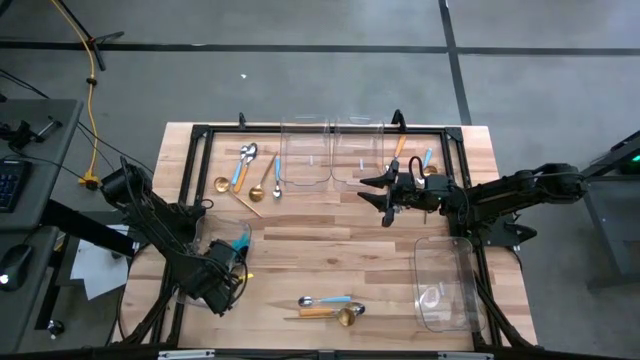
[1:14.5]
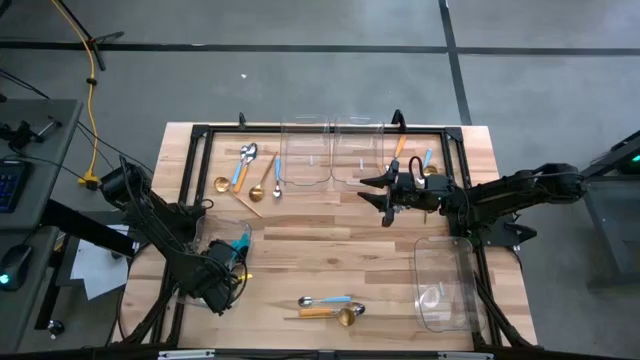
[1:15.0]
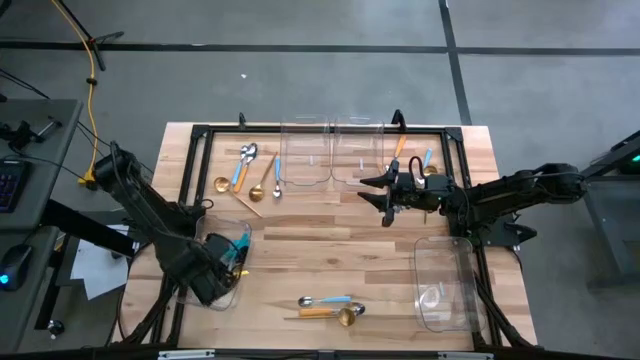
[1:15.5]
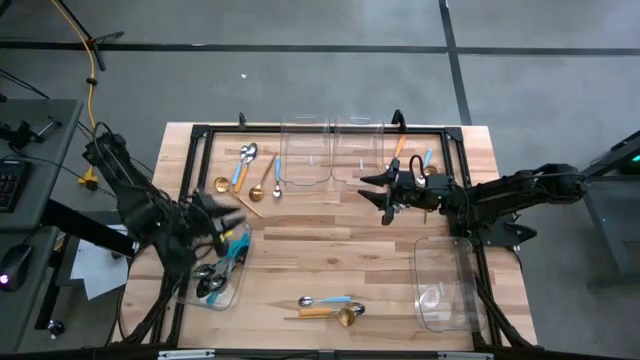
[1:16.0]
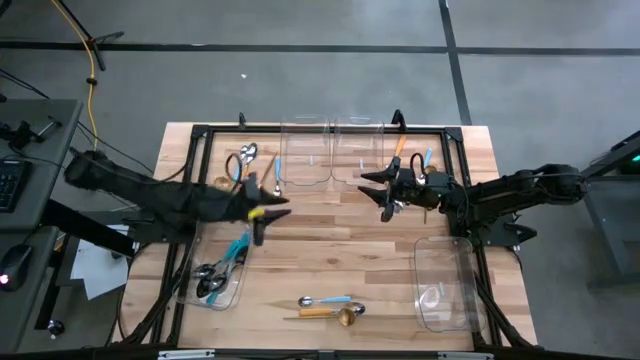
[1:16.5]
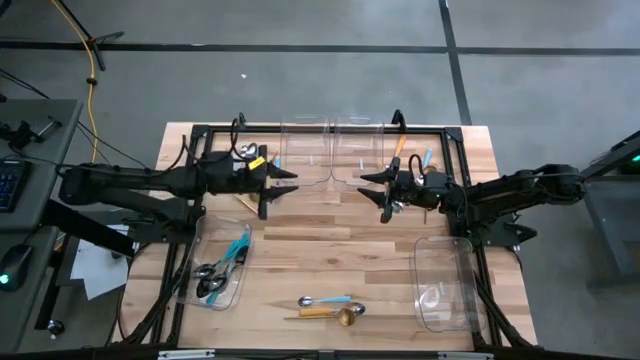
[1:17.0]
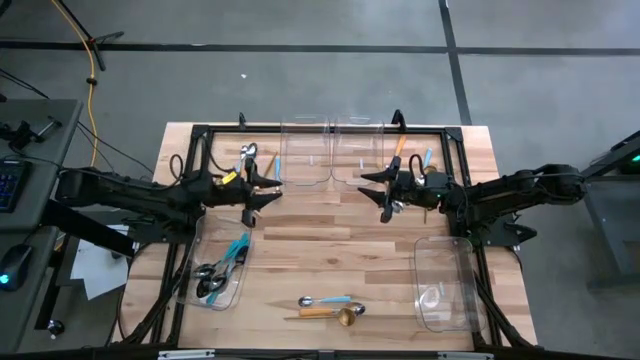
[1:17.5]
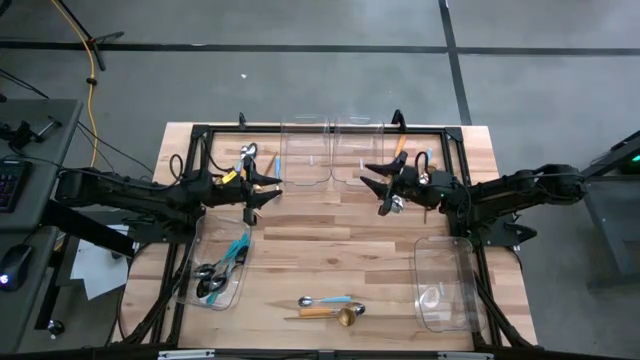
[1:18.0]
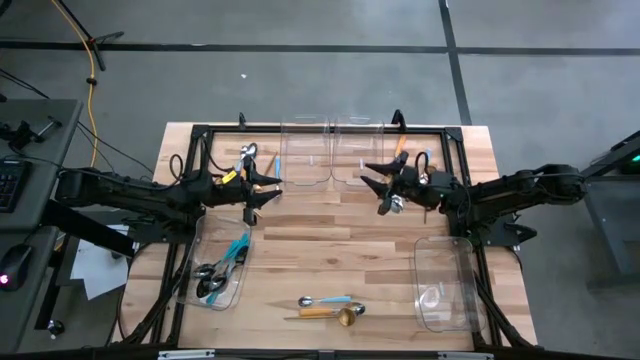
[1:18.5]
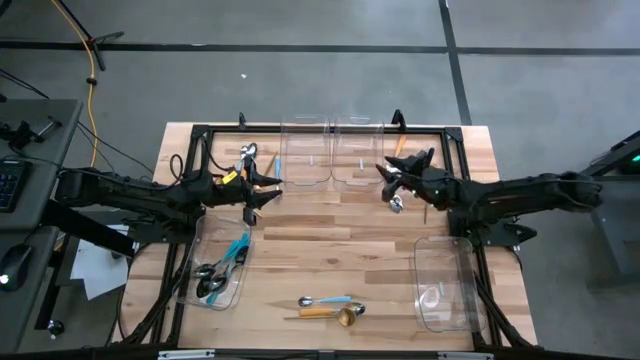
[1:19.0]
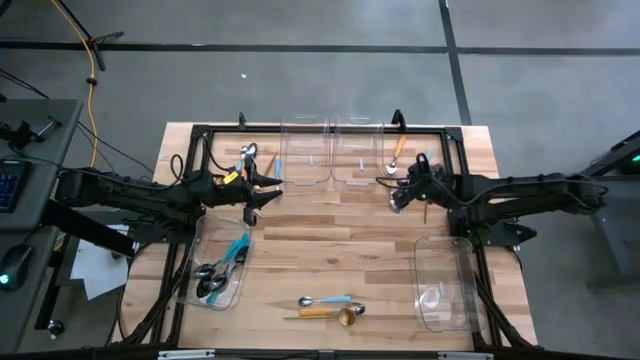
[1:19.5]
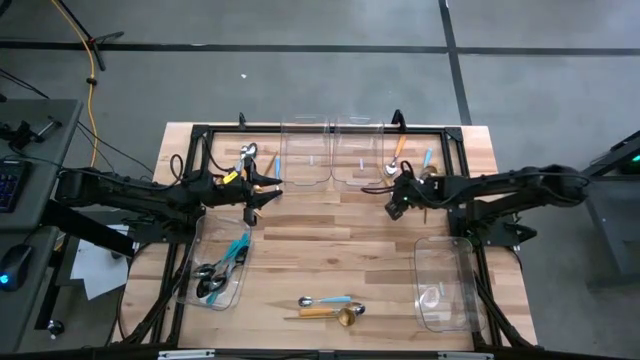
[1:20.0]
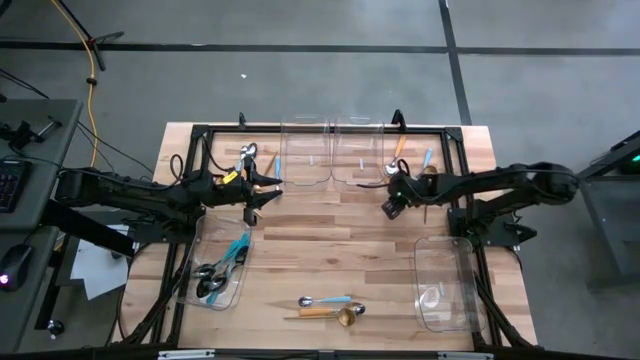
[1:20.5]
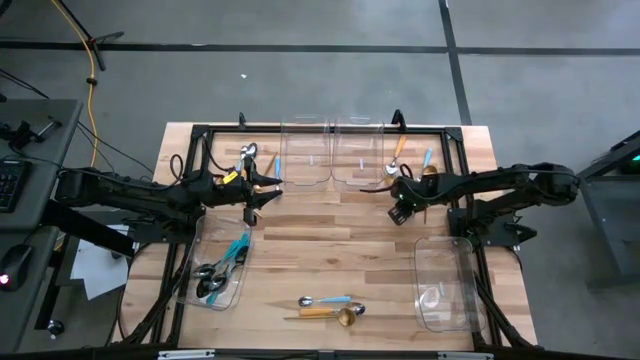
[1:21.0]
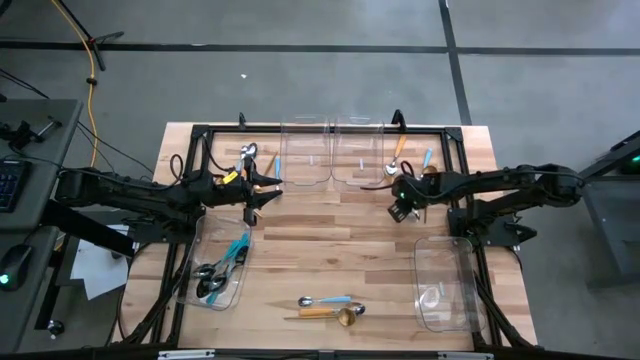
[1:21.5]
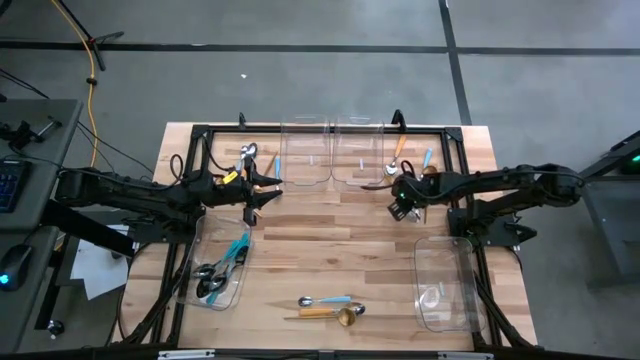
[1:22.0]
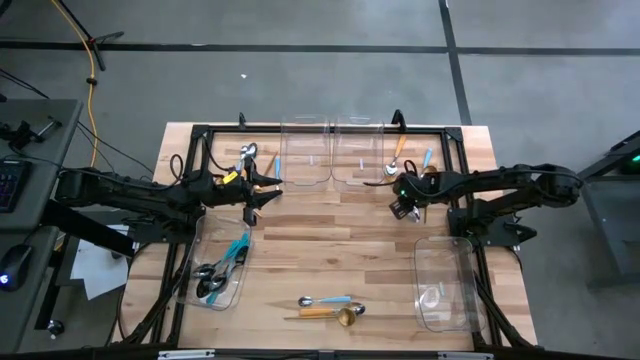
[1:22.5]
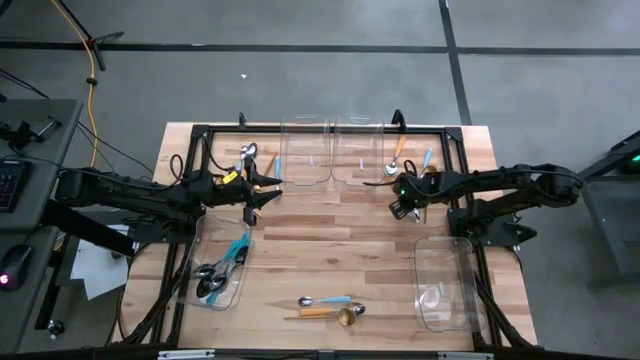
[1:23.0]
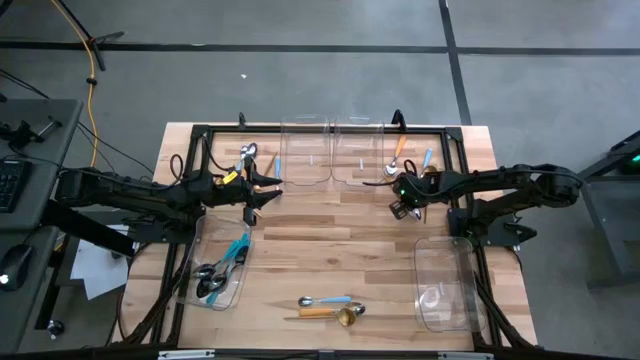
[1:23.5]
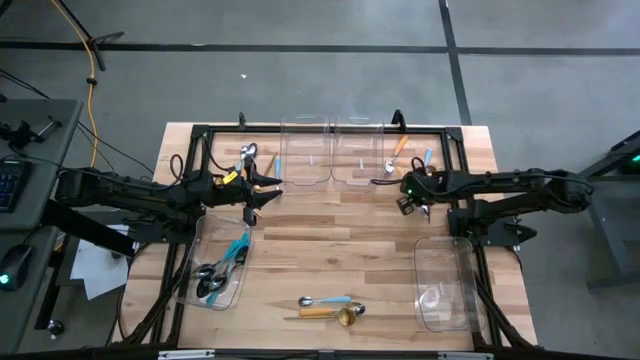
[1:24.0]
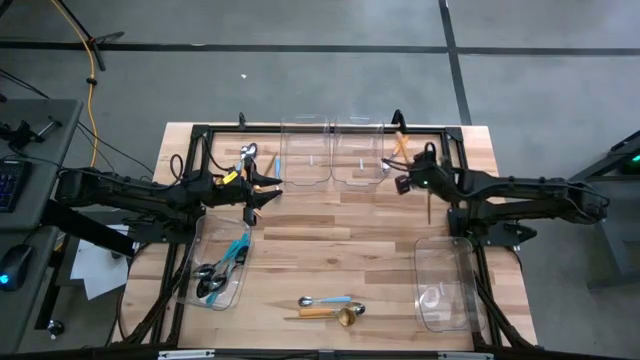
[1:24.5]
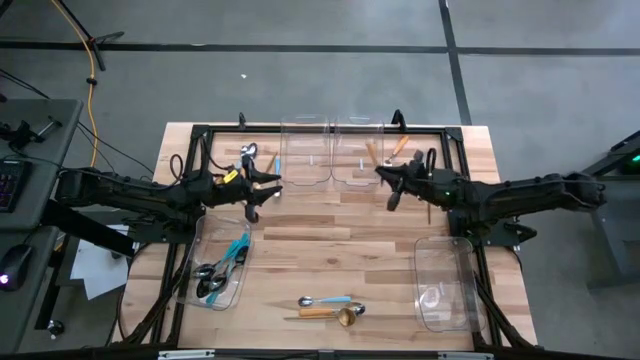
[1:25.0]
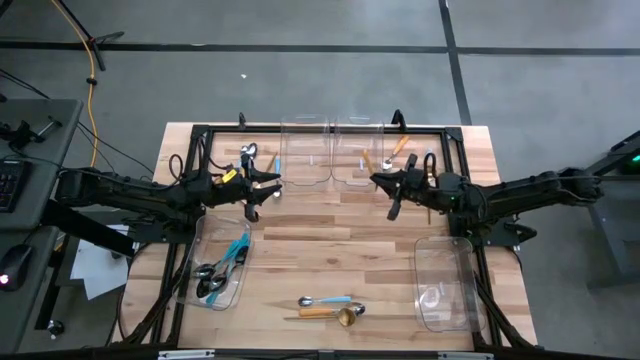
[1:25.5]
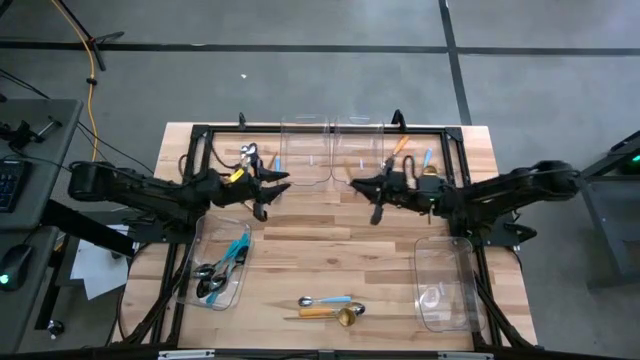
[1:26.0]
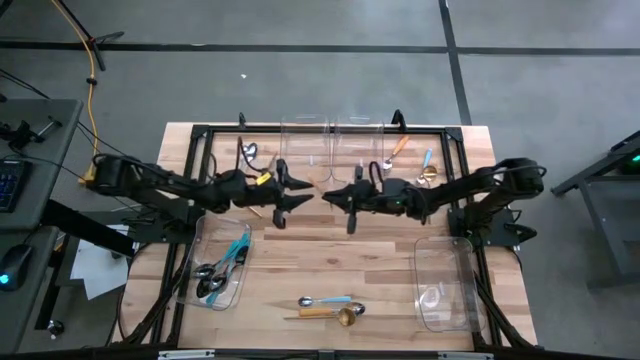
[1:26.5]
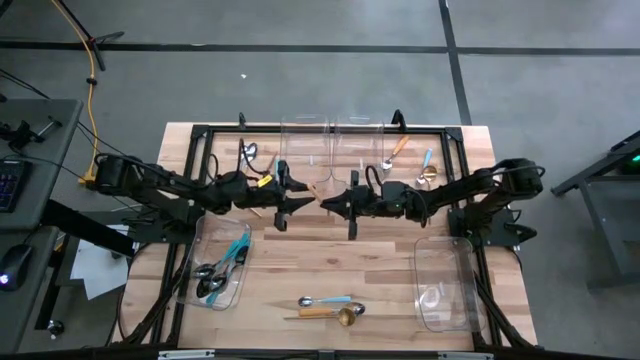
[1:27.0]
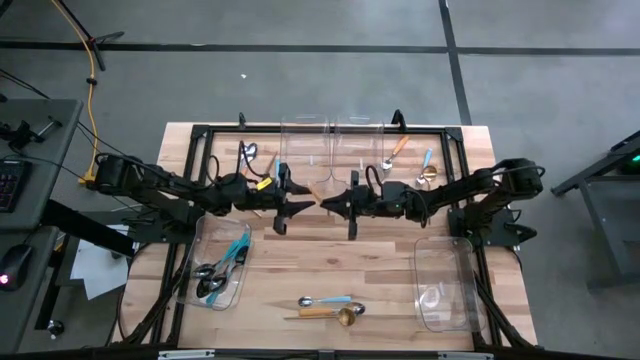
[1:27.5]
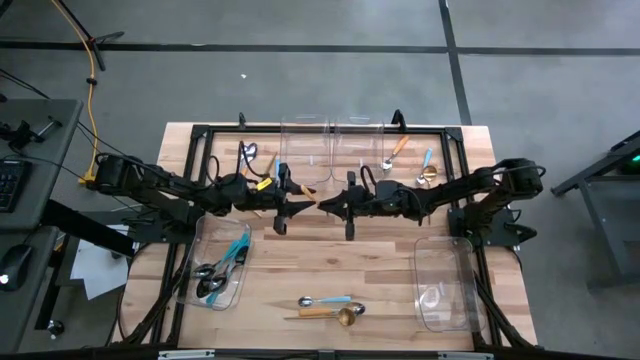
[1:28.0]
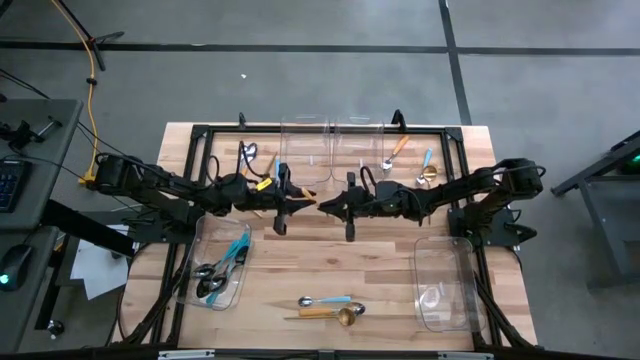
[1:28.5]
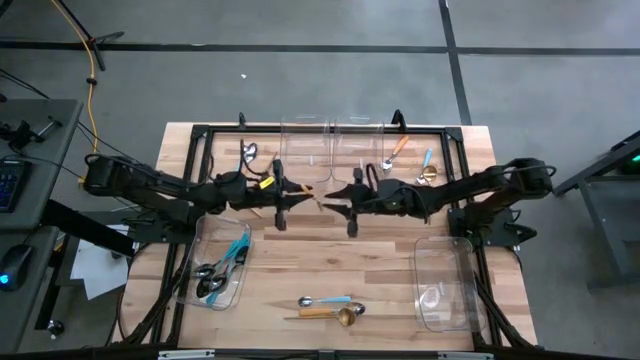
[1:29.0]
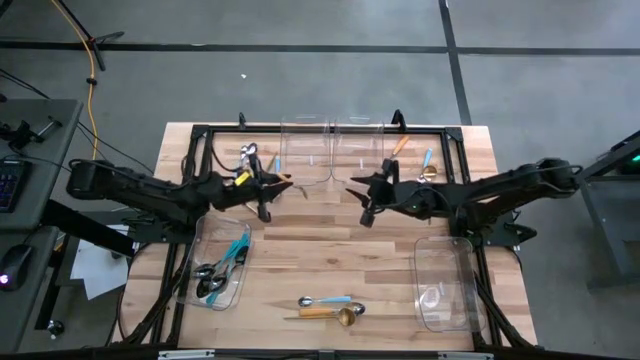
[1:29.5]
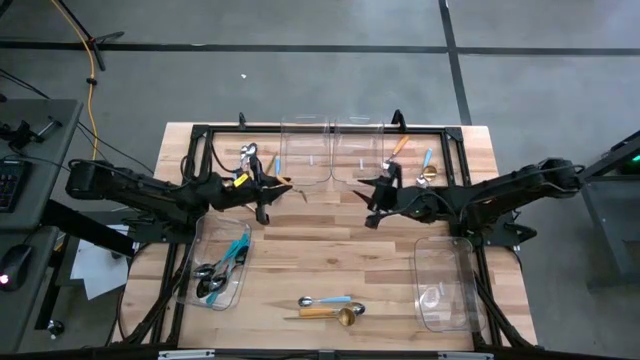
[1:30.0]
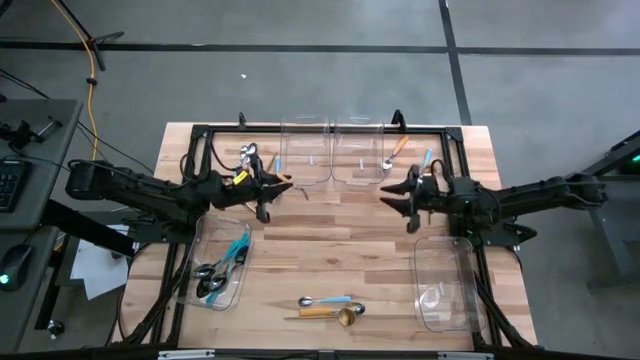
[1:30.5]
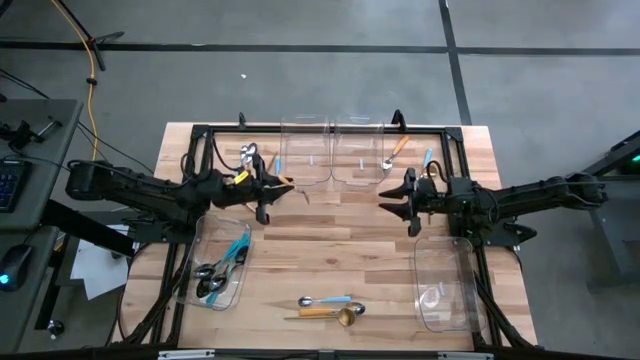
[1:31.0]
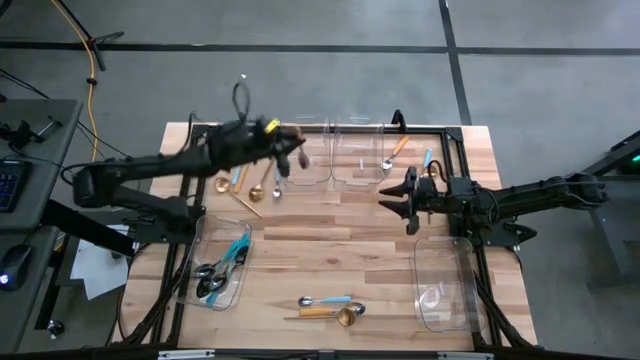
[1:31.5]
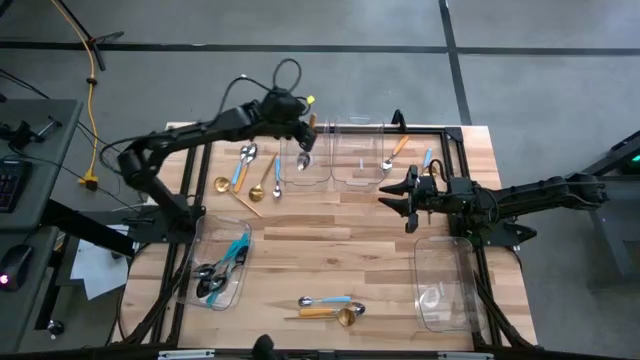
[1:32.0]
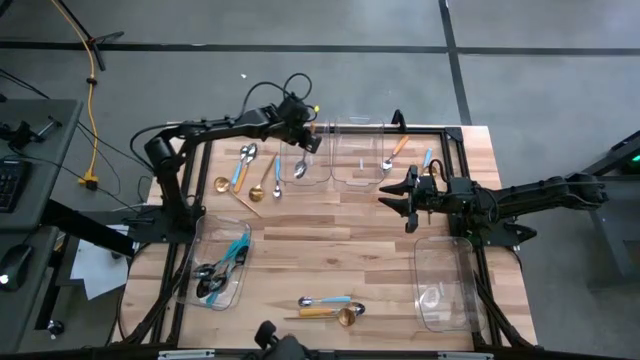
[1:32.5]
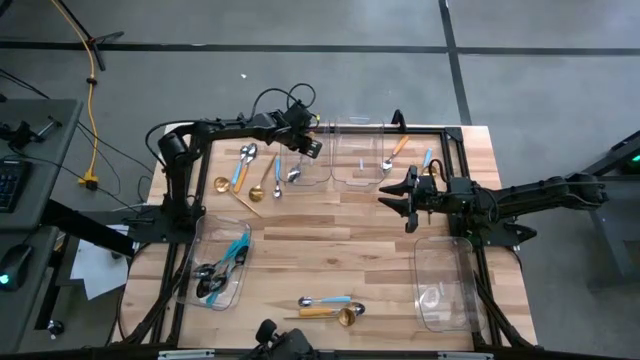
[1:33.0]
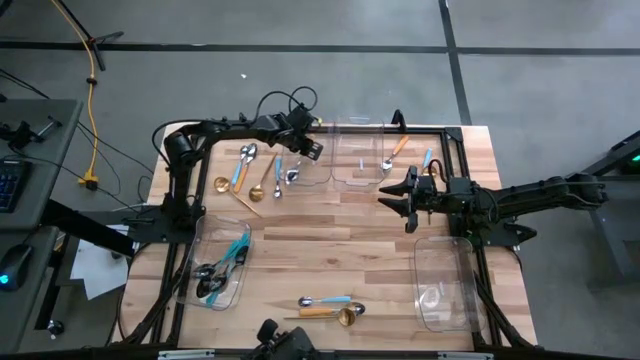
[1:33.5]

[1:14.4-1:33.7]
Task: Sort silverware by color (type)
Put the yellow spoon into the top left transparent bin
